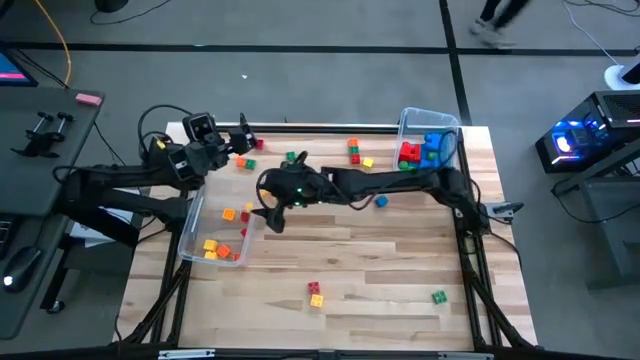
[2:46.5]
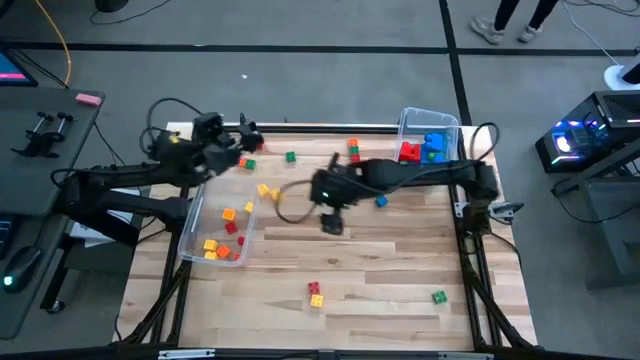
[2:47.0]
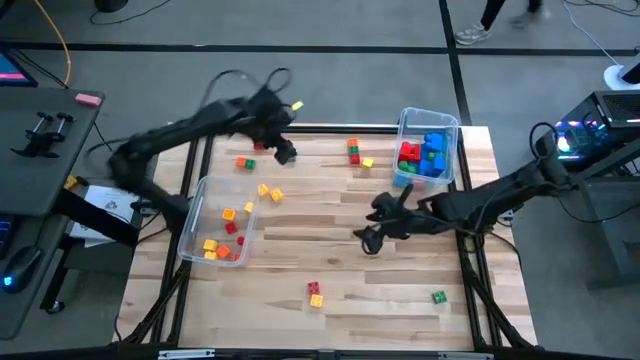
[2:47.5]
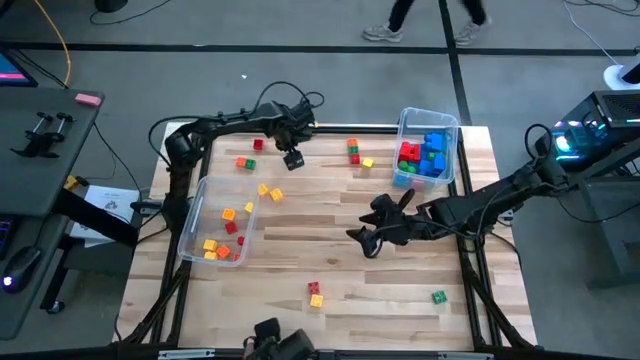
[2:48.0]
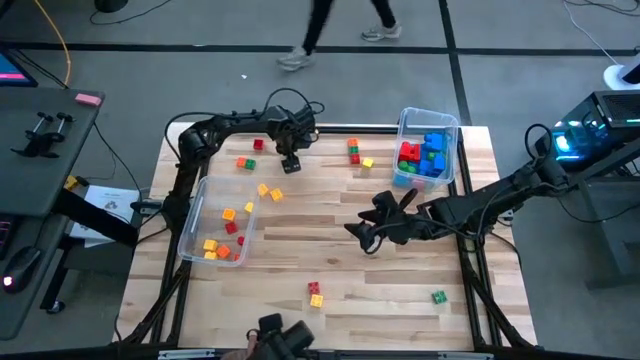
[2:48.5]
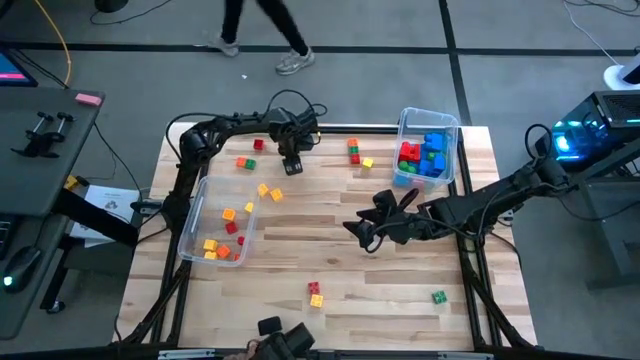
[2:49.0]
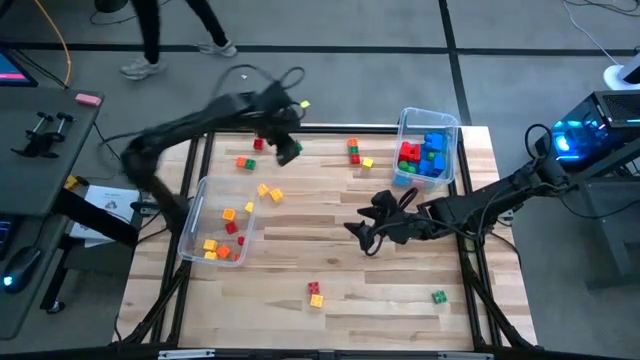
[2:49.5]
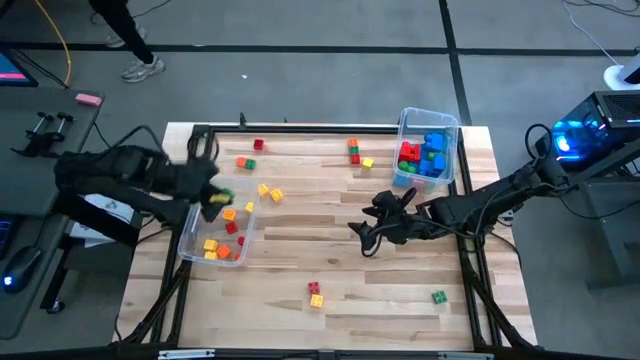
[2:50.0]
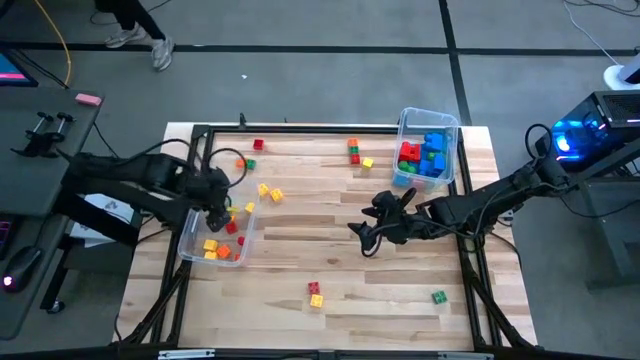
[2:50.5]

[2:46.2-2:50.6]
Task: Sort blocks by size
Put the small green game piece into the left transparent bin

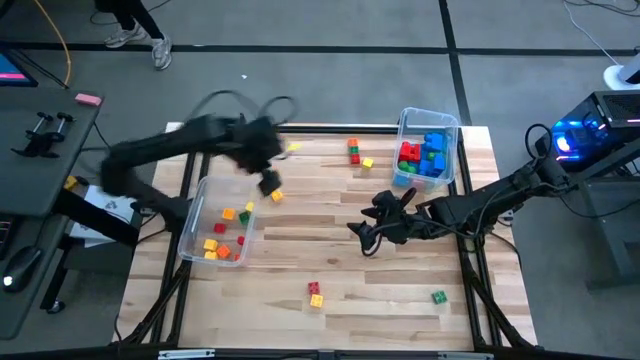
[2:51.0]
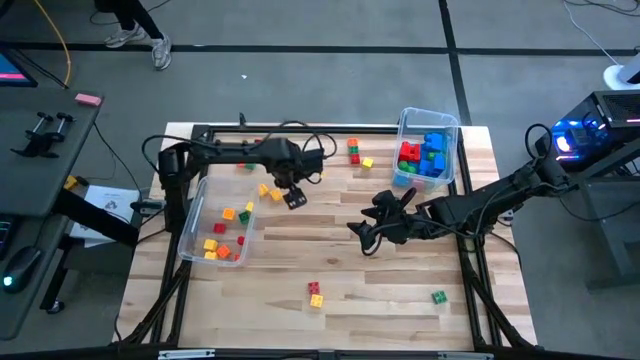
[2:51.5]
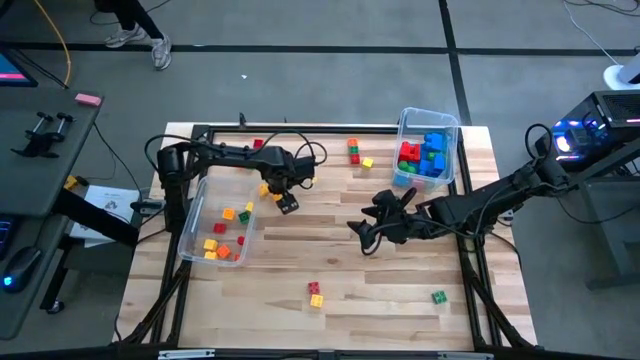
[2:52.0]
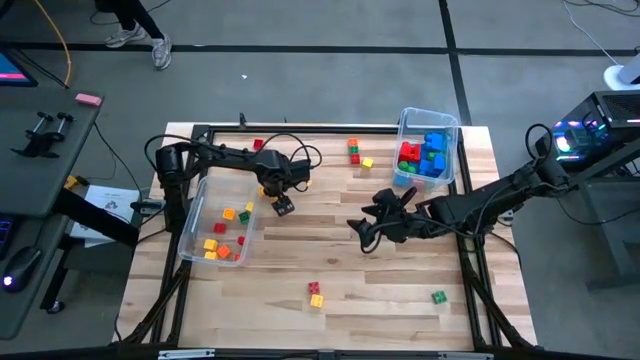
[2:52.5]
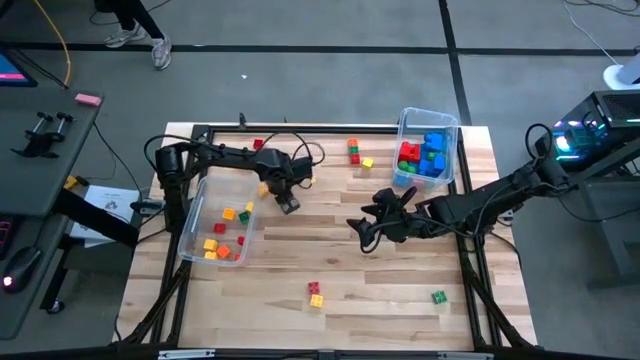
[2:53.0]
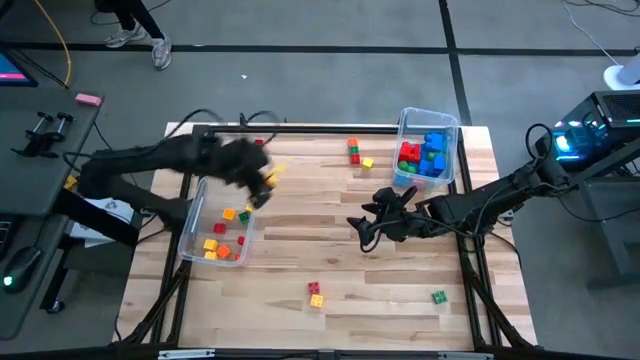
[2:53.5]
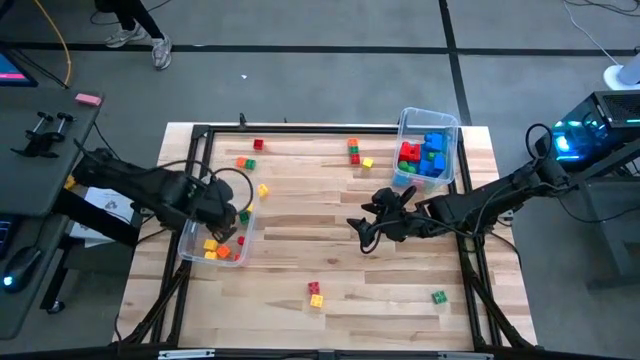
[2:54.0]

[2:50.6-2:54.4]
Put the small yellow game piece into the left transparent bin

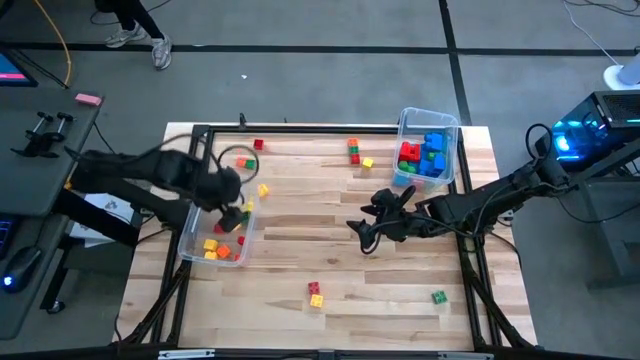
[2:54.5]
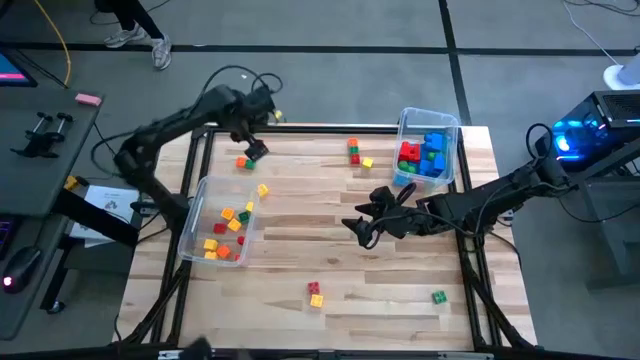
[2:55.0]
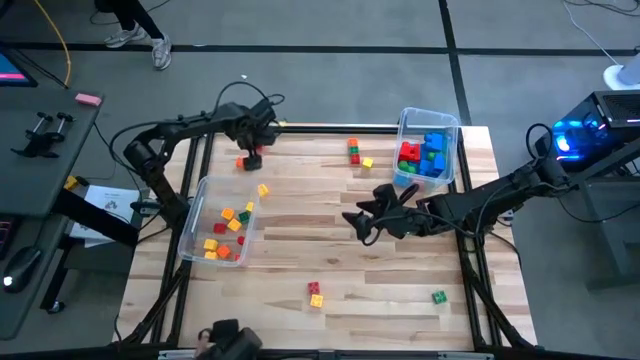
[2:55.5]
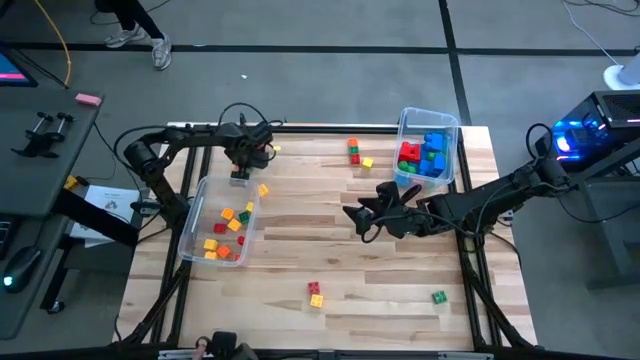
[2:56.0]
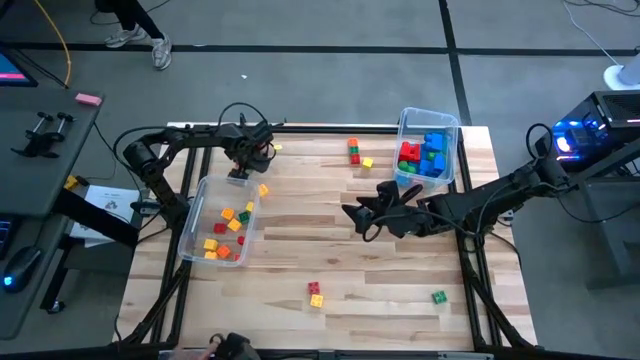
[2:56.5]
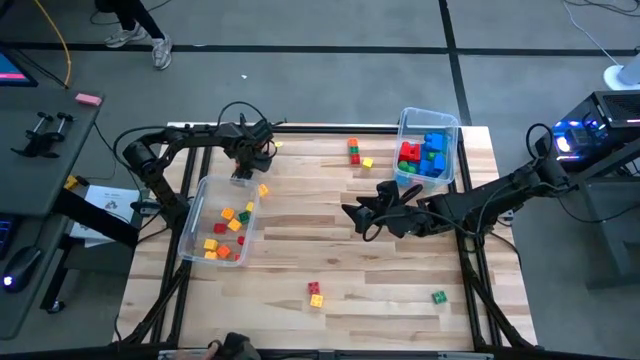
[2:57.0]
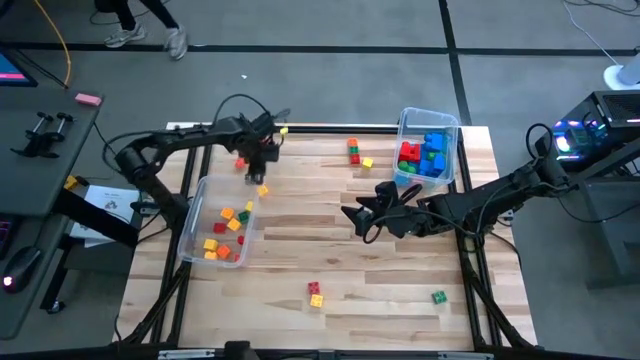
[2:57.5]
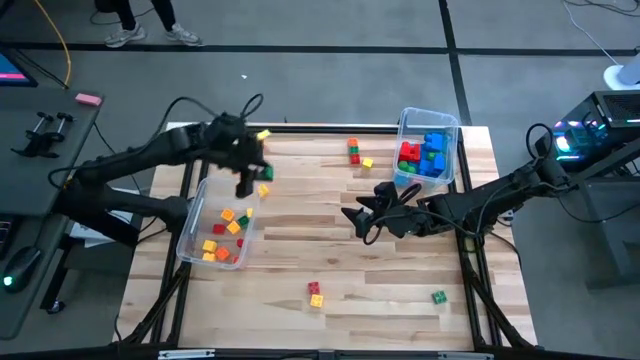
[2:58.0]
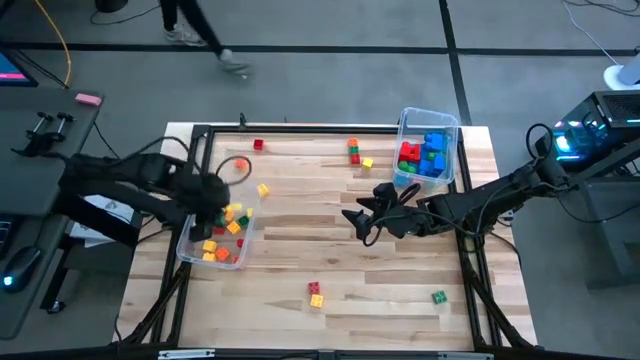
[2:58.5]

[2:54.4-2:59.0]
Put the small green game piece into the left transparent bin

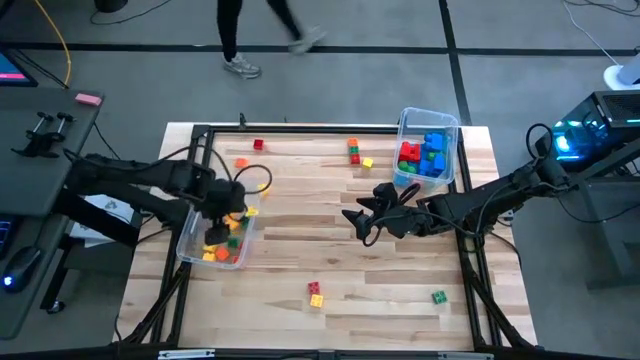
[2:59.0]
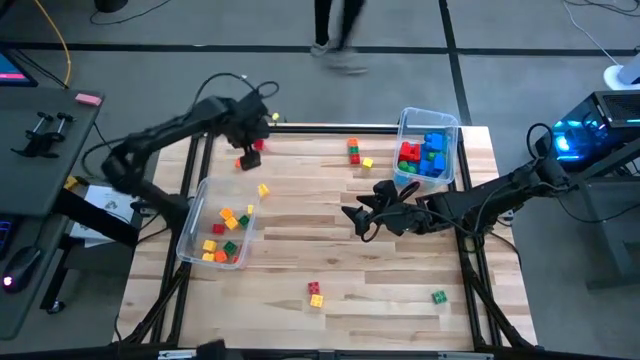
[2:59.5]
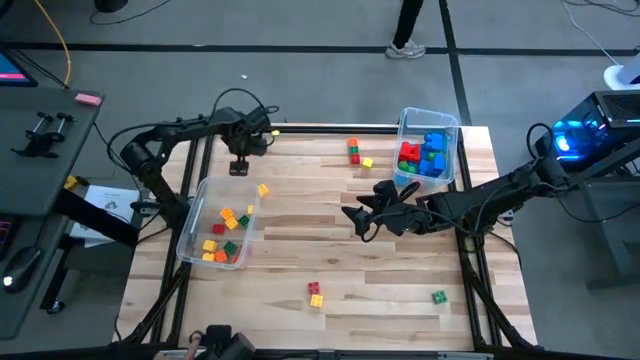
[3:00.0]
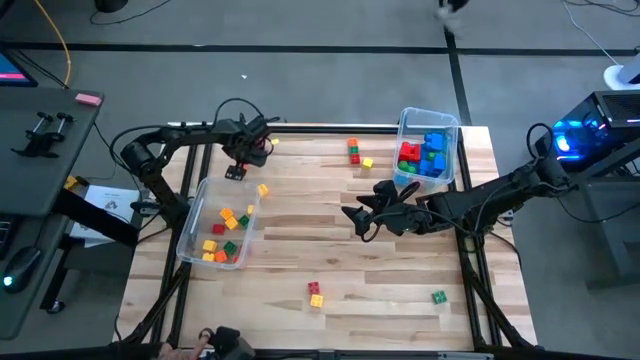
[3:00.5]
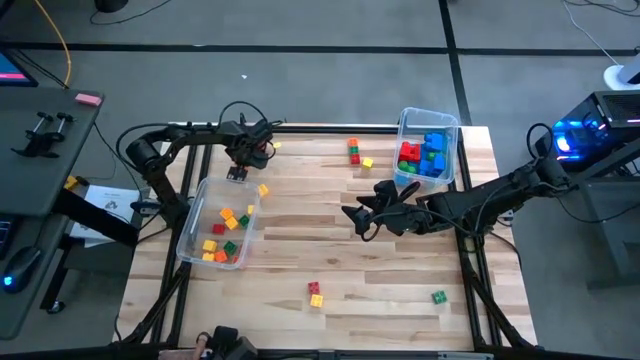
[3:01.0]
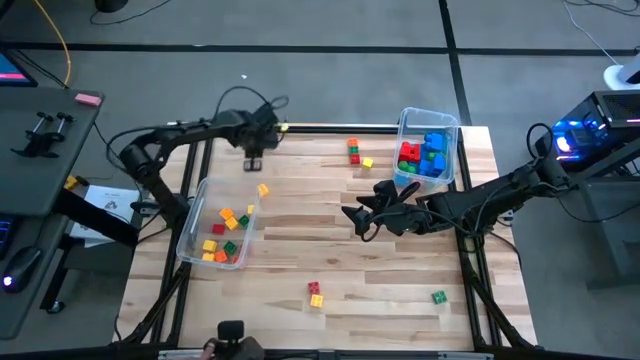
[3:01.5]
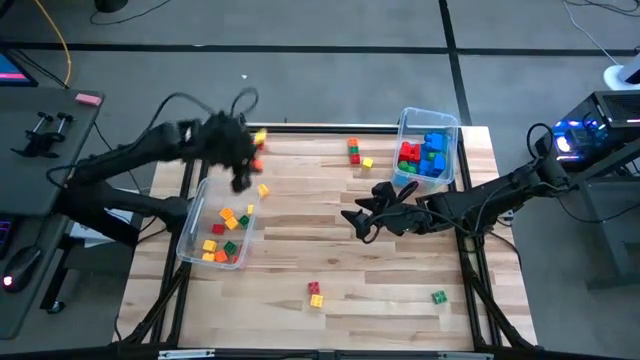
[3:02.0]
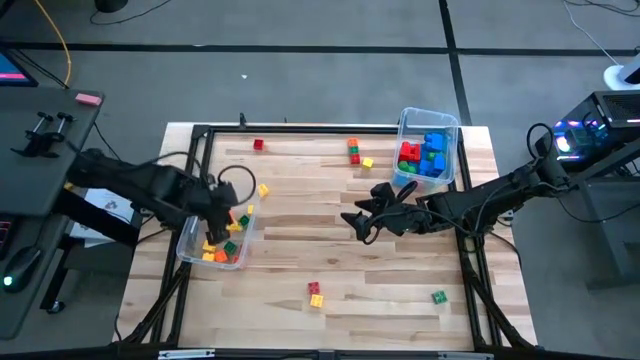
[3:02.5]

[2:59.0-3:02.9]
Put the small orange game piece into the left transparent bin

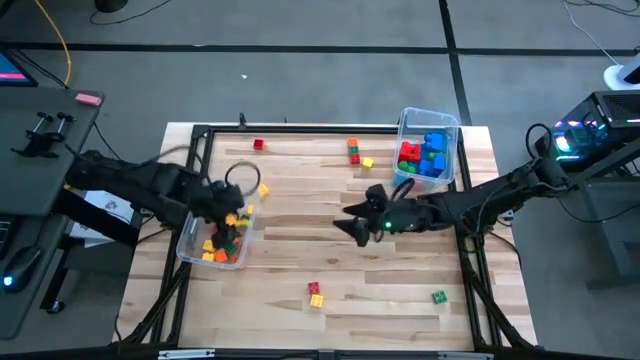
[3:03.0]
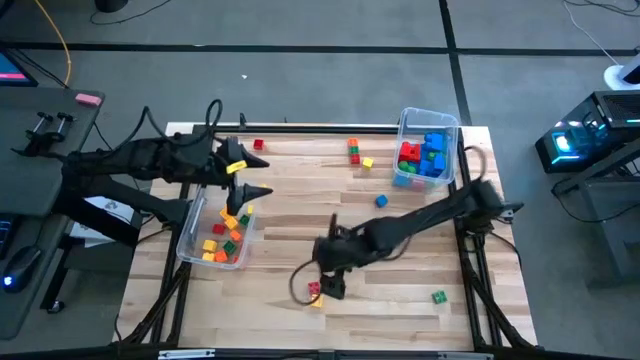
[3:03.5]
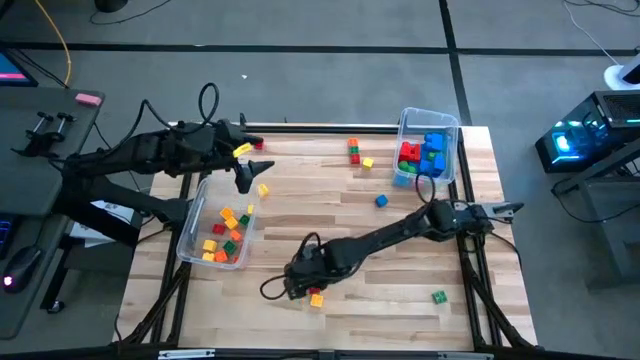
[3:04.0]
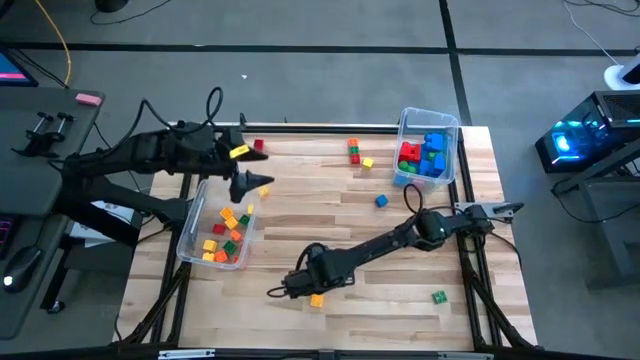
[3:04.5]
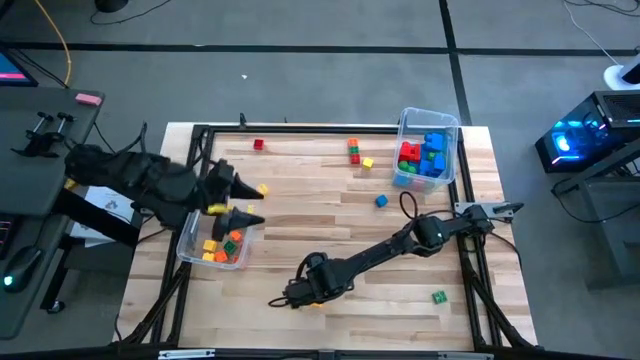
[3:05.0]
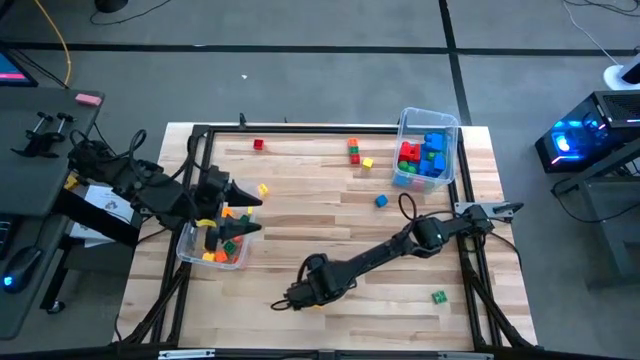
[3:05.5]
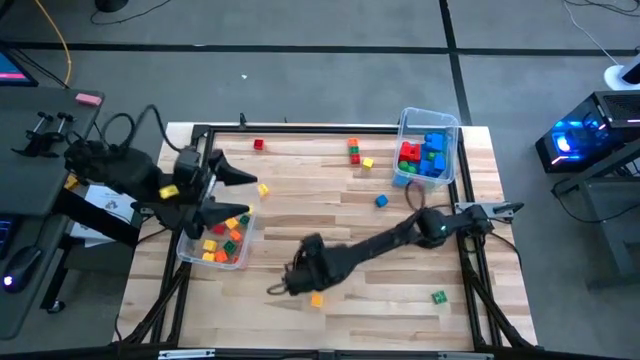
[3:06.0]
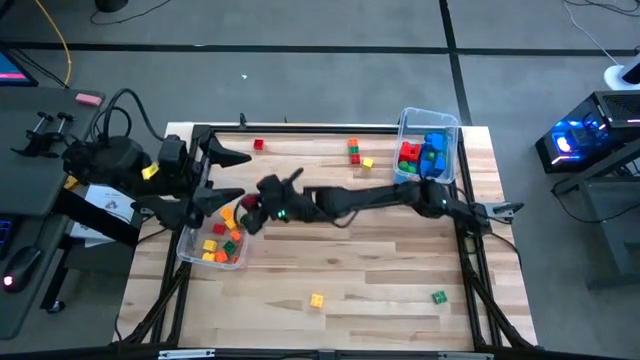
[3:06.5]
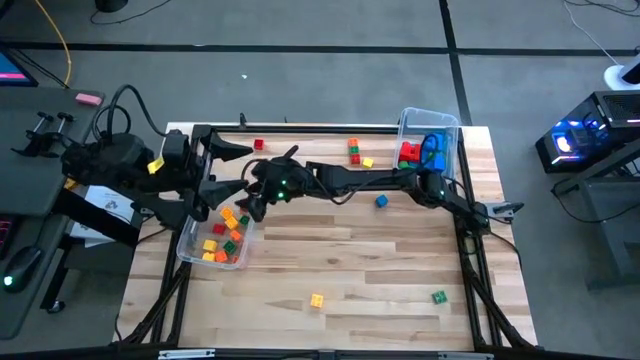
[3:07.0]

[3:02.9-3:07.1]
Put the small red game piece into the left transparent bin

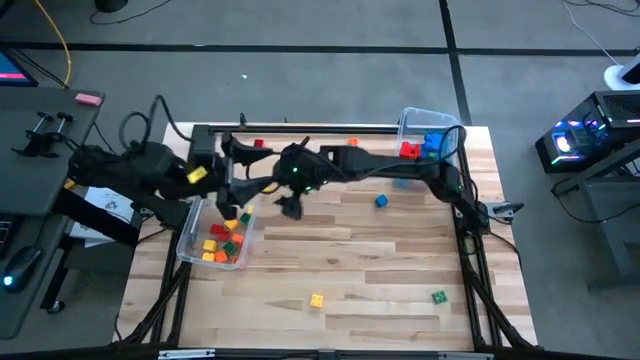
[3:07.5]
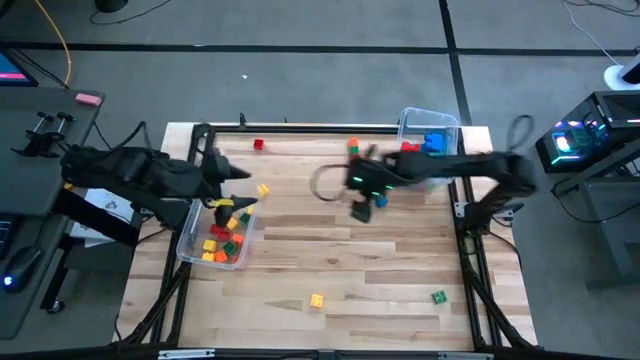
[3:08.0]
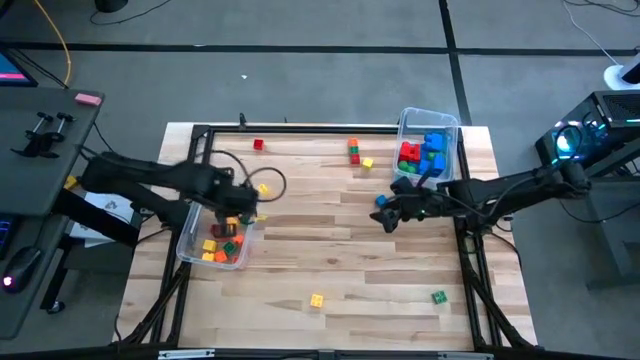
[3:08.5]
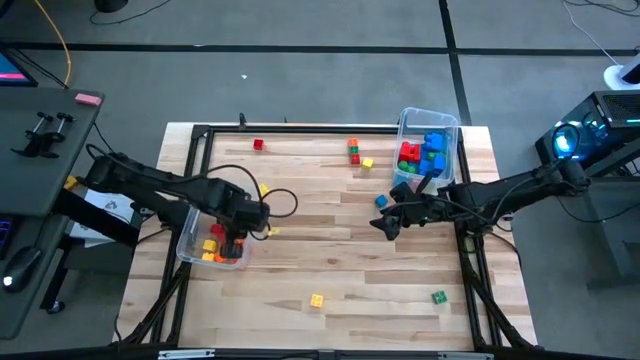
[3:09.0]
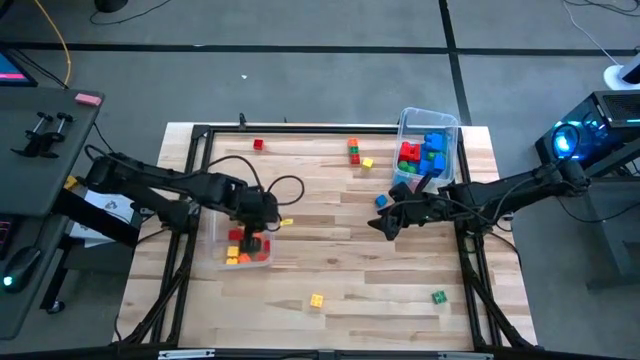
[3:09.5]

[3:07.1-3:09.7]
Adjust the left transparent bin
